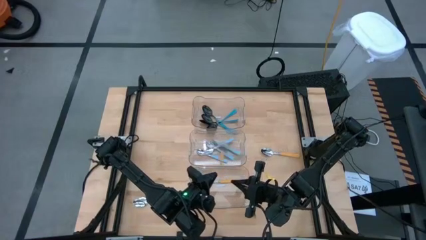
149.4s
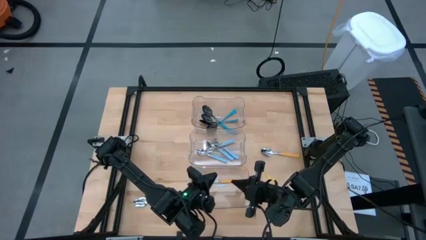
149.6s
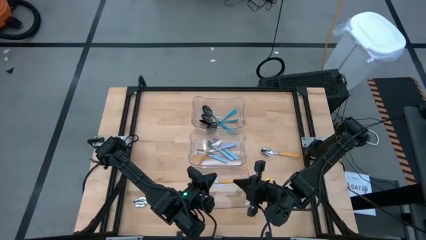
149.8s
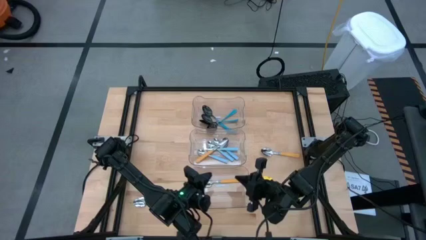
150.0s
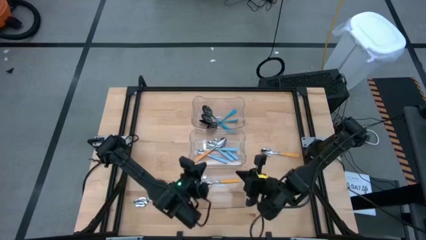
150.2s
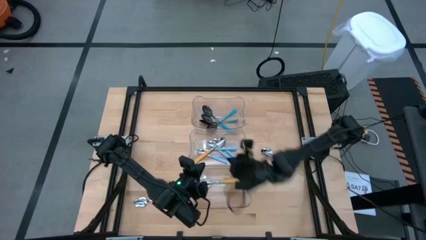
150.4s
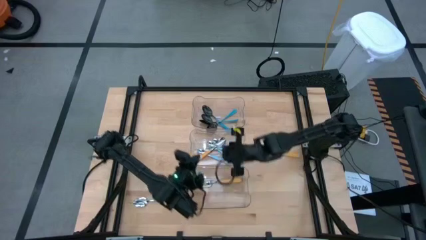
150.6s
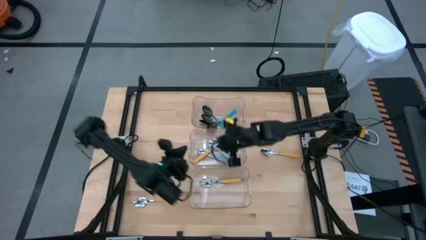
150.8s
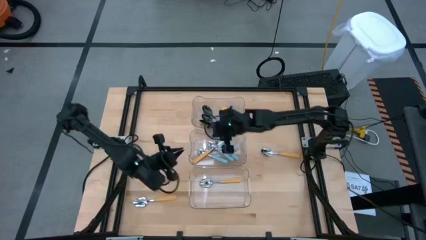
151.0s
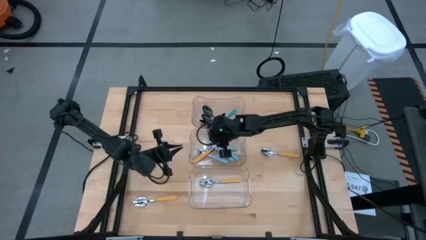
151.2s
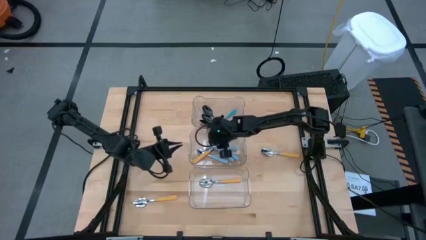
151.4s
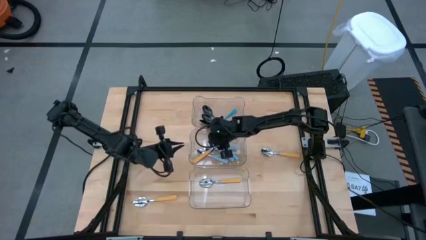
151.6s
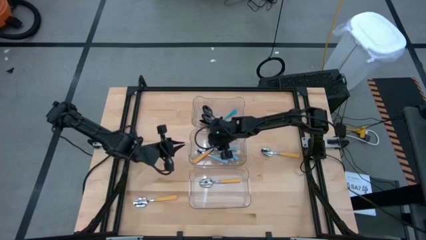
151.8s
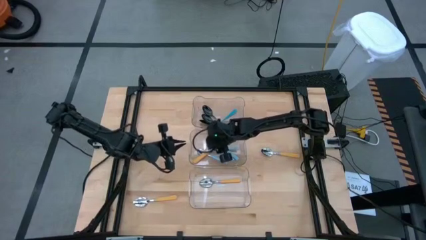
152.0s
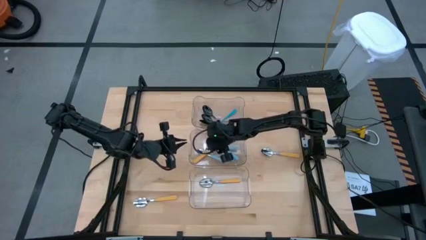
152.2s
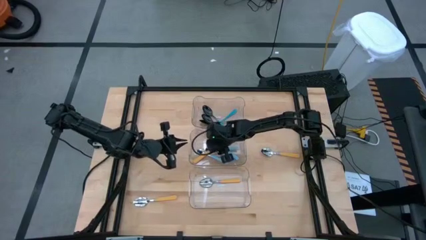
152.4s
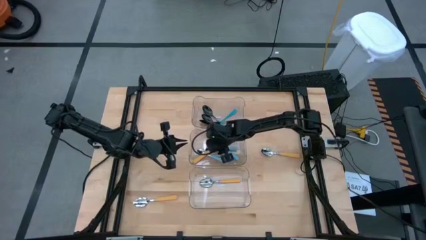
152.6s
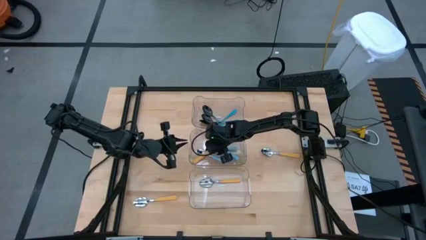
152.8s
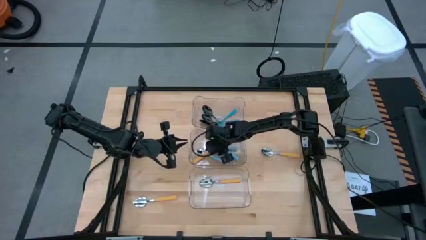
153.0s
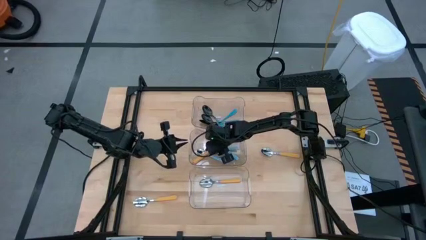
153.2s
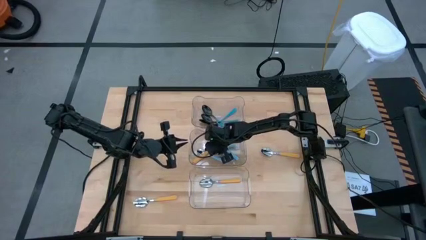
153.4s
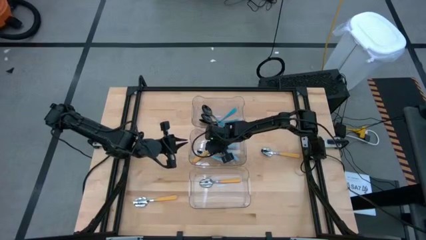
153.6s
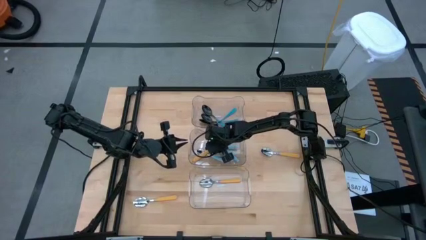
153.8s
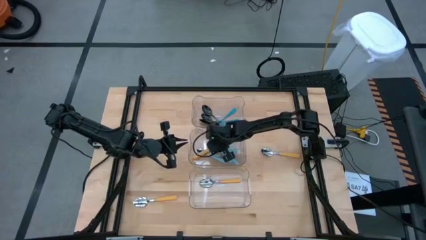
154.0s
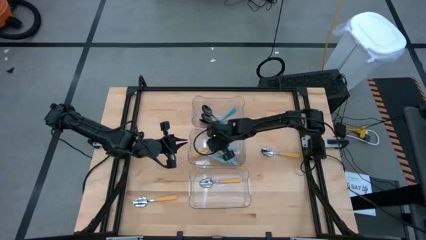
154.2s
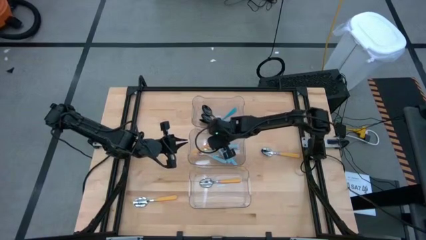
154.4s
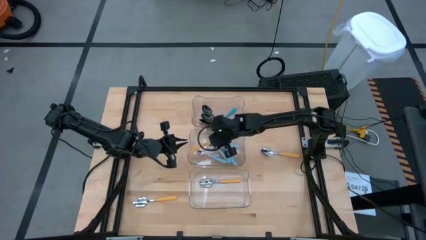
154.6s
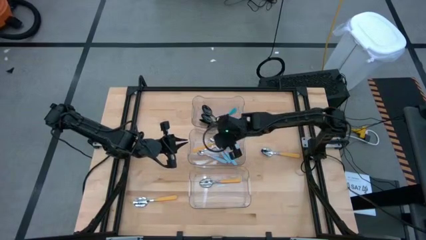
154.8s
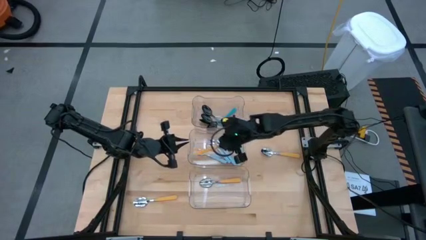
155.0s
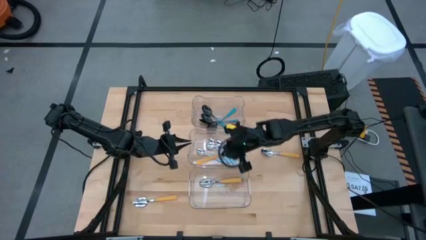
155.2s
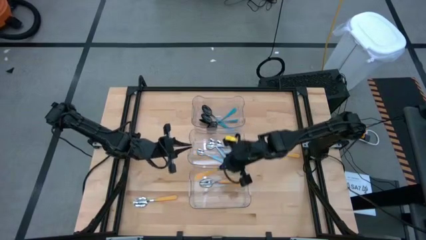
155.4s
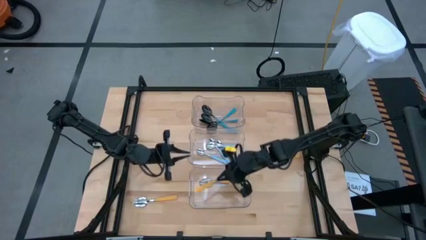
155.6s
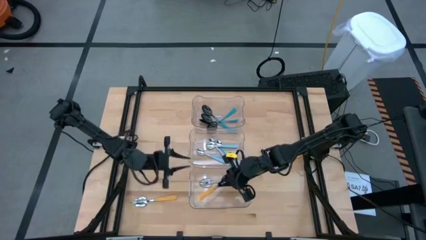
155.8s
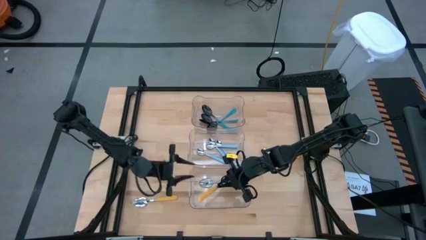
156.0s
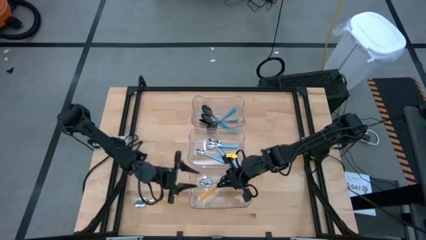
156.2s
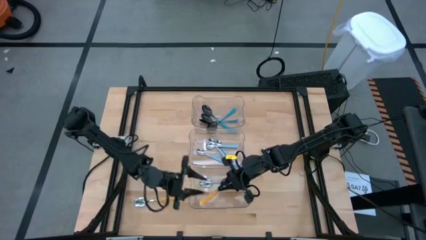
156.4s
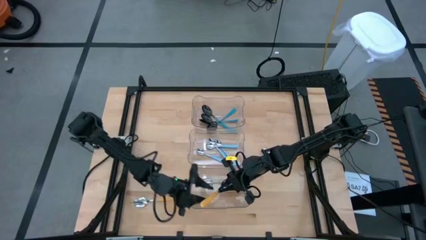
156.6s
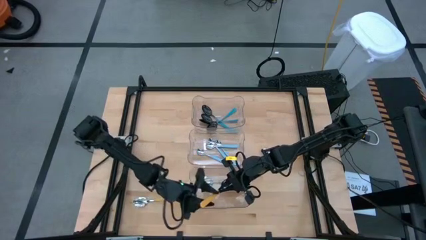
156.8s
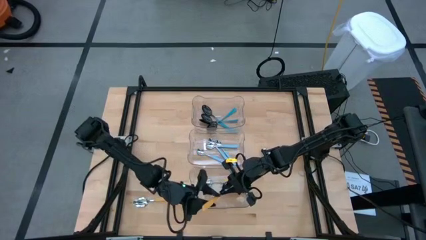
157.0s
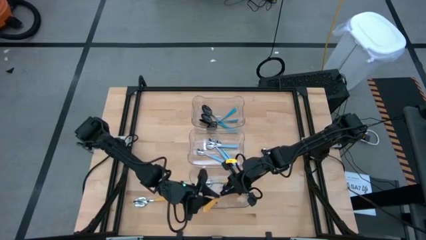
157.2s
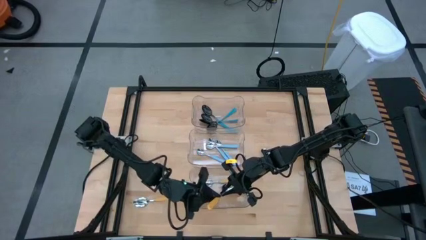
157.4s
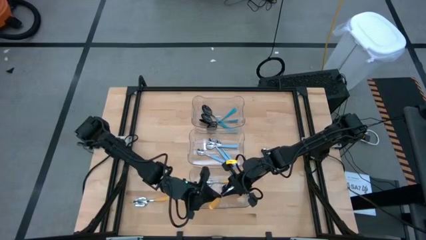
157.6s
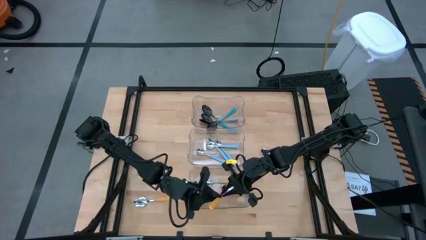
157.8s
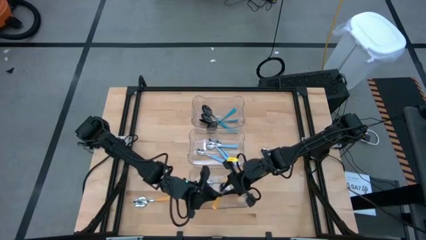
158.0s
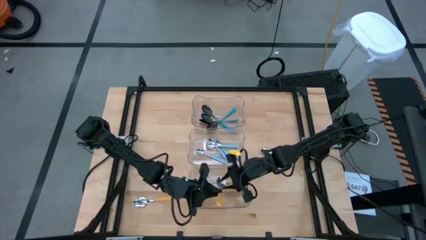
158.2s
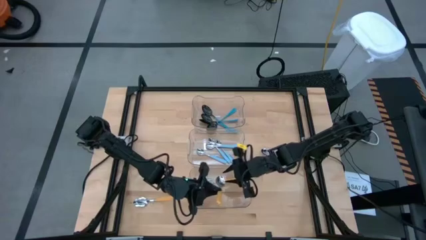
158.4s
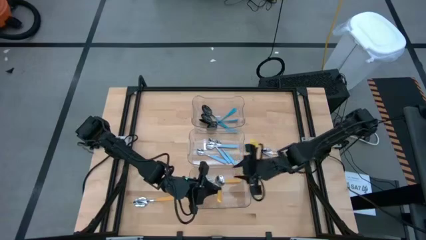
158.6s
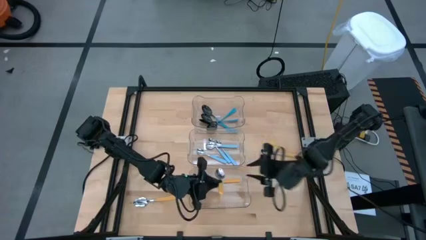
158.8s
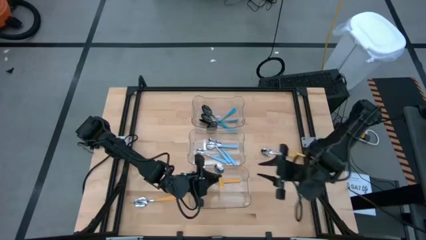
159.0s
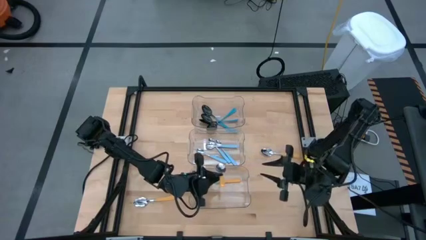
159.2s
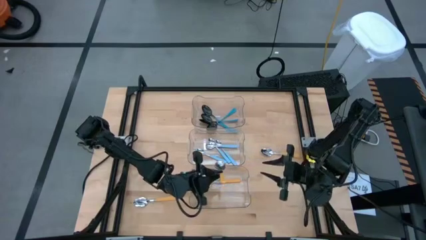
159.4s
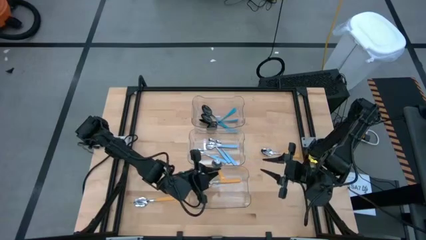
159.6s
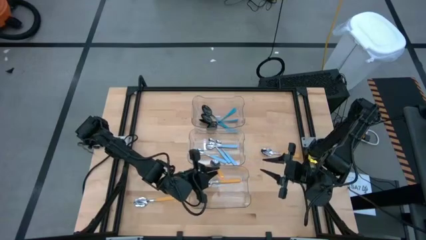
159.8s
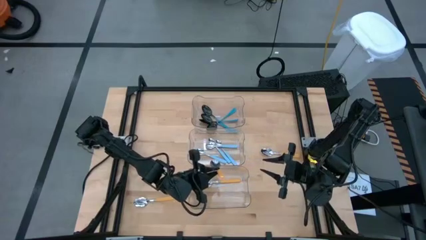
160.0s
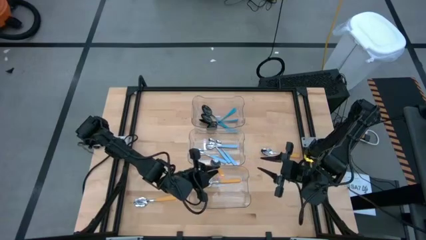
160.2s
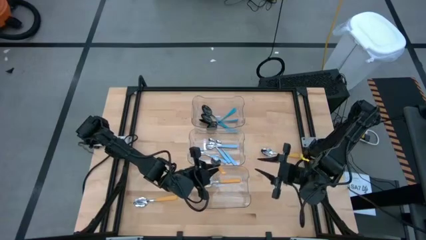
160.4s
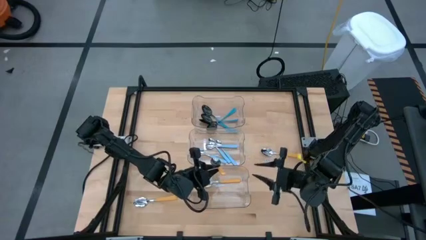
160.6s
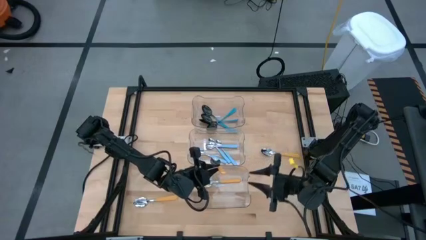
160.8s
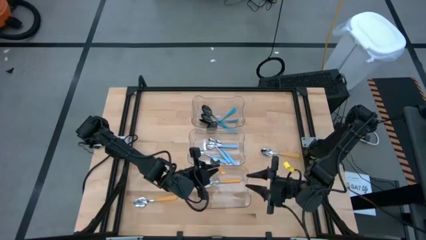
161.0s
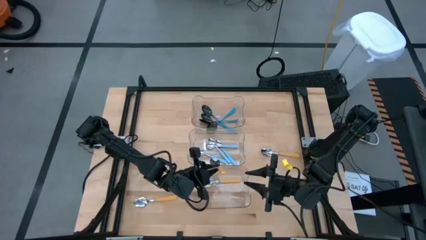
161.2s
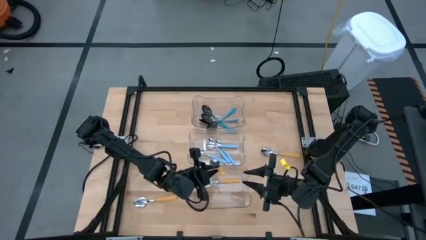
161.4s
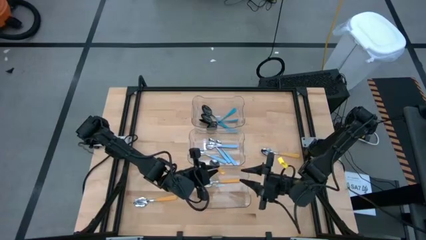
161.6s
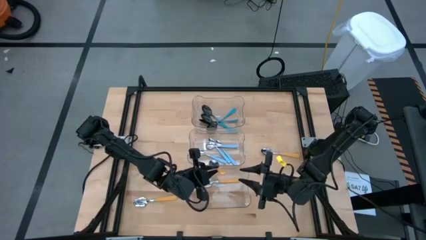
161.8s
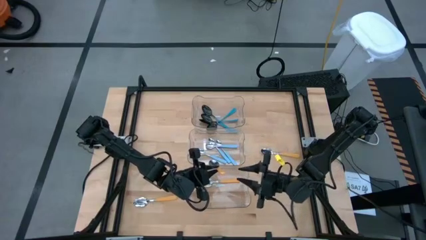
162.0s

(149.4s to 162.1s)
Task: Sort silverware by color (type)
Put the yellow spoon into the bottom transparent bin

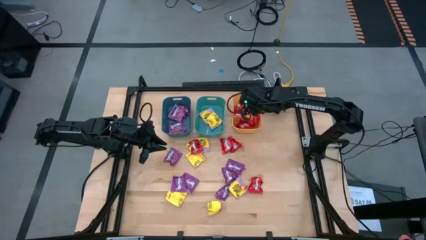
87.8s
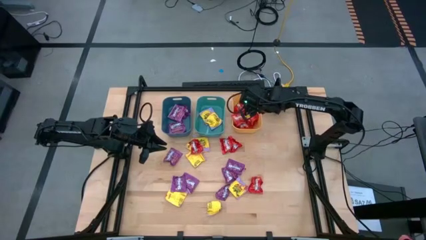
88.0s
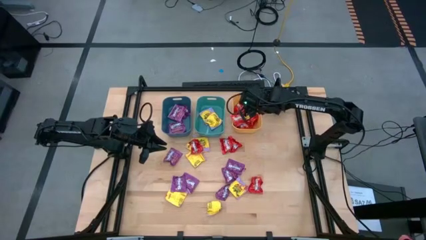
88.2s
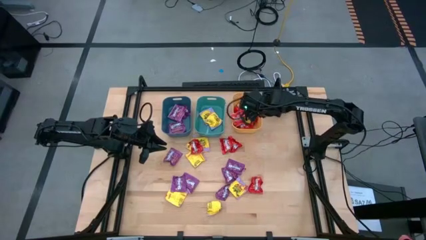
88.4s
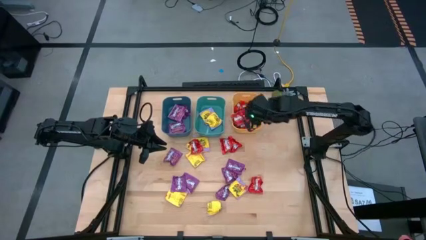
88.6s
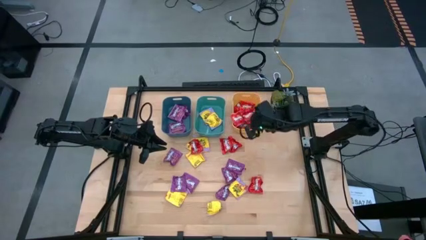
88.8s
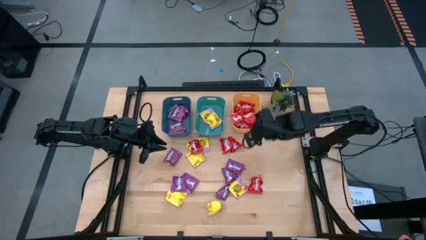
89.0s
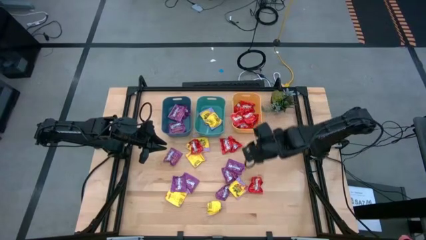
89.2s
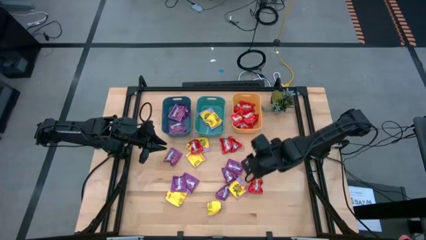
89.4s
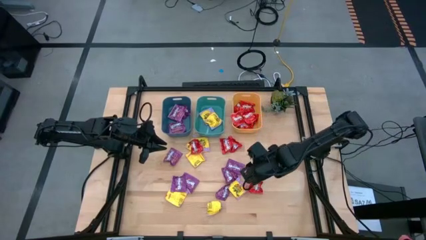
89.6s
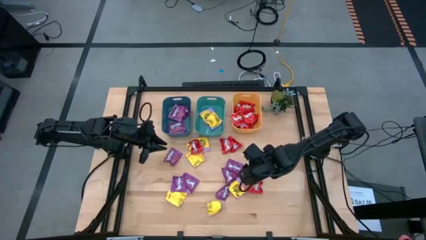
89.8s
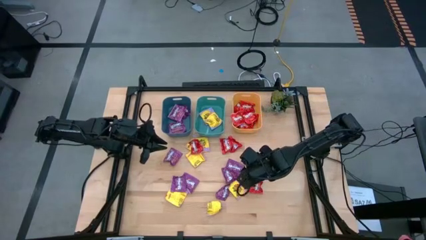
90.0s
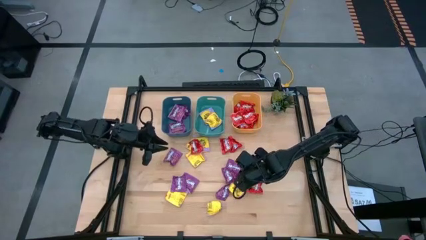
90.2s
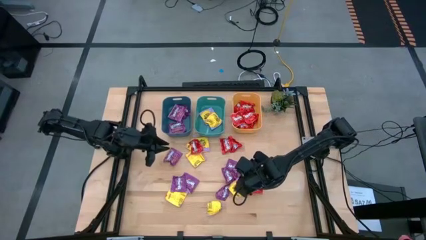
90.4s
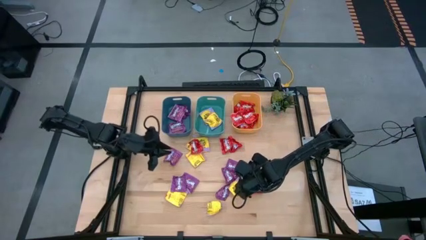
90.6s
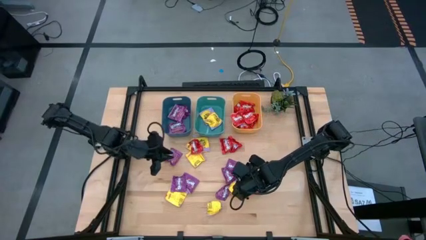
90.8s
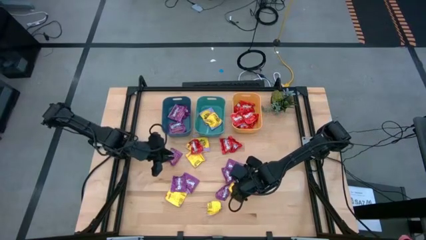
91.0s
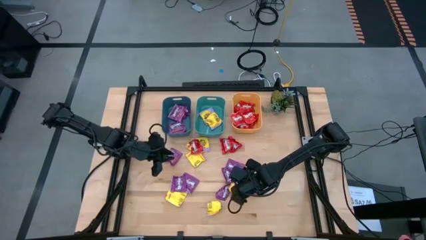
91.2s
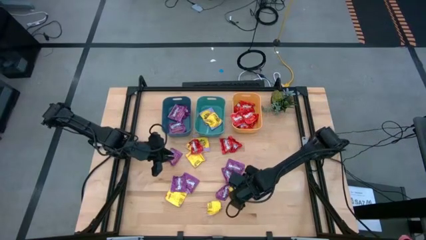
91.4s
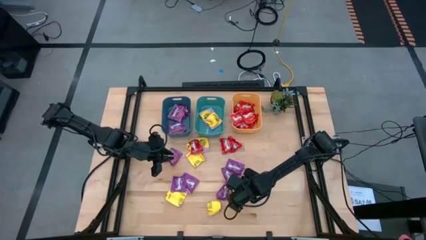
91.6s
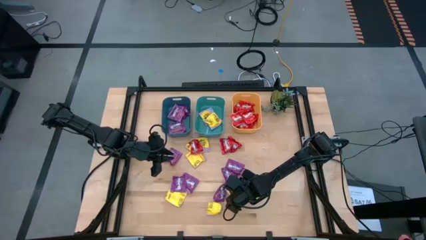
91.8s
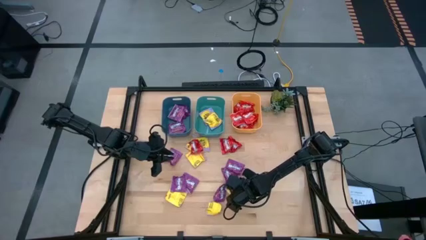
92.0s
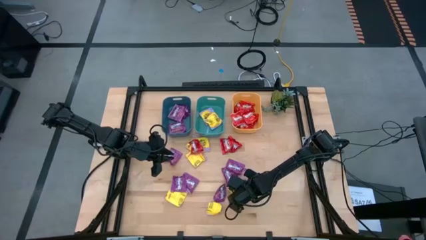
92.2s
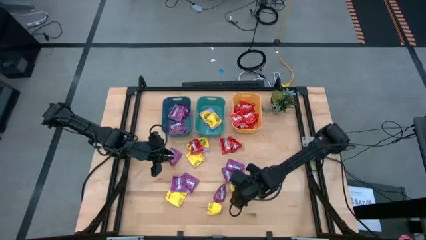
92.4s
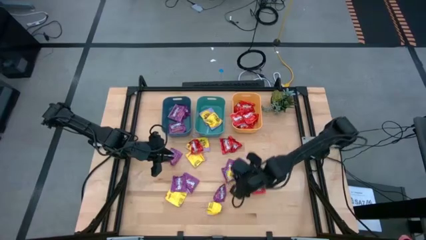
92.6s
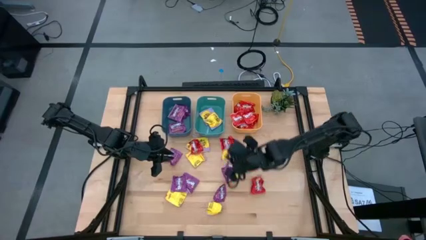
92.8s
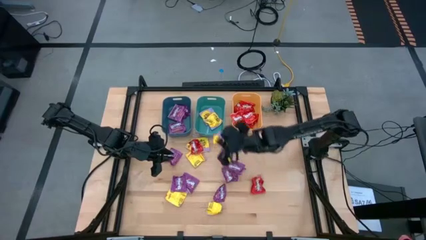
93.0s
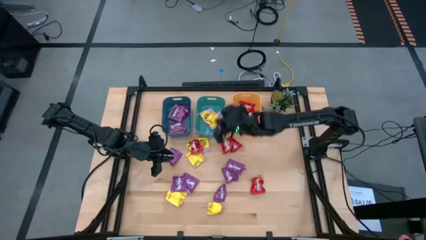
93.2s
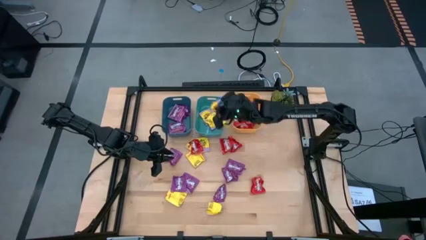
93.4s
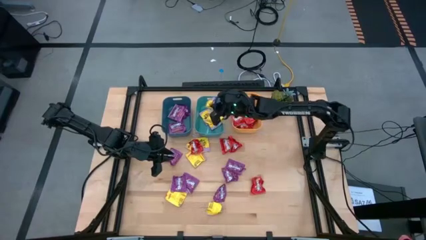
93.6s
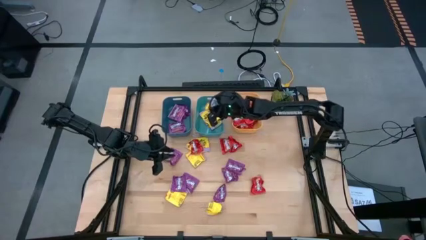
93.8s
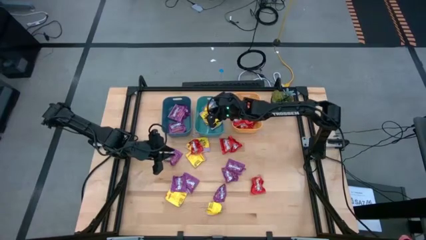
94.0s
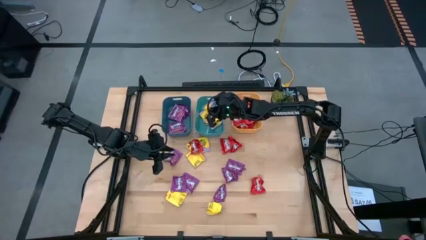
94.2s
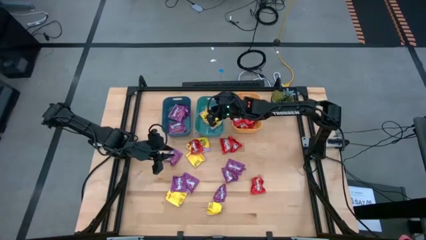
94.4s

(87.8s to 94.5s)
Task: Sort candy
Put the yellow candy into the green bin
